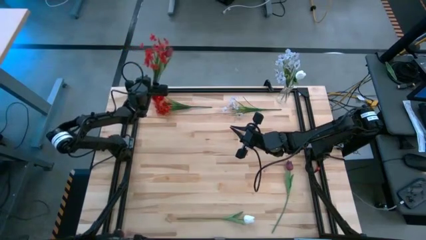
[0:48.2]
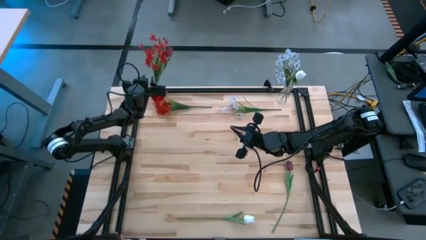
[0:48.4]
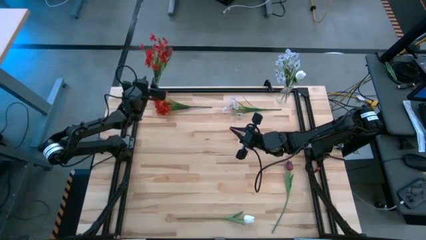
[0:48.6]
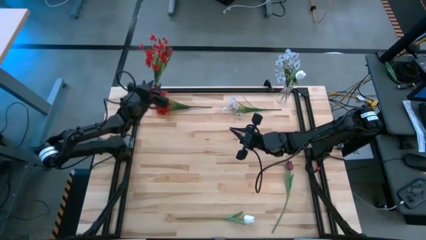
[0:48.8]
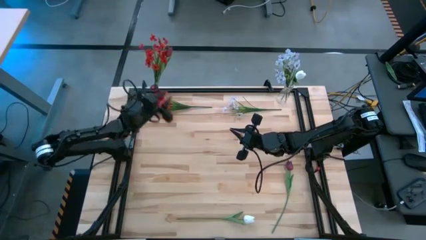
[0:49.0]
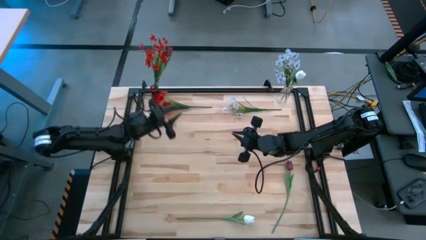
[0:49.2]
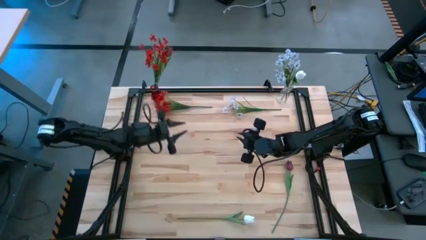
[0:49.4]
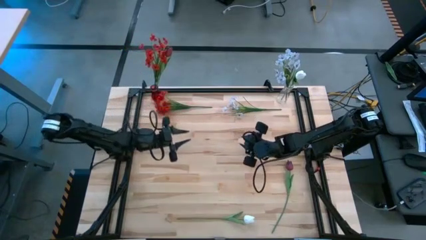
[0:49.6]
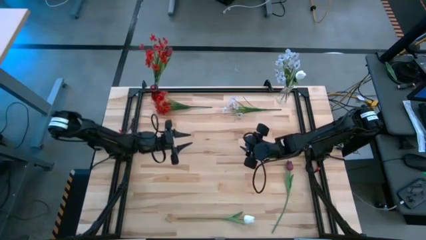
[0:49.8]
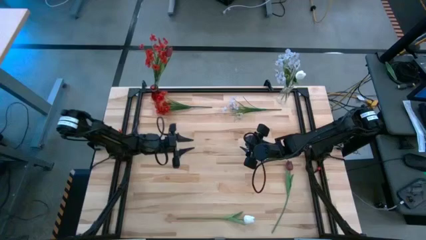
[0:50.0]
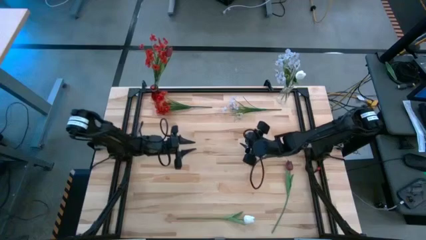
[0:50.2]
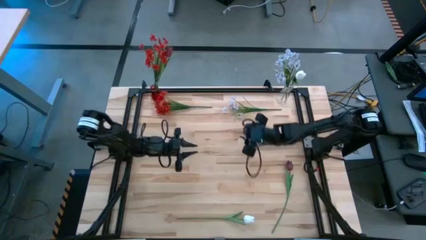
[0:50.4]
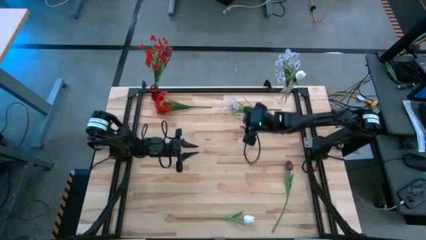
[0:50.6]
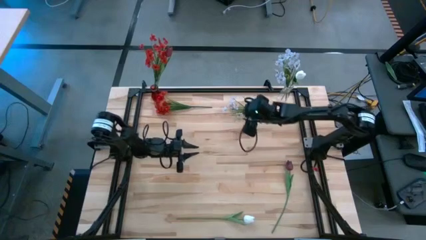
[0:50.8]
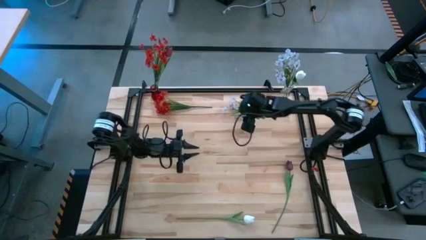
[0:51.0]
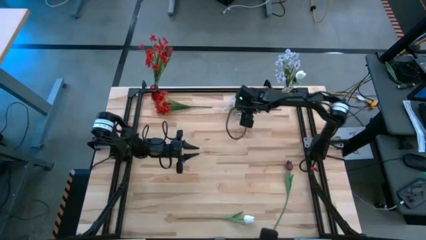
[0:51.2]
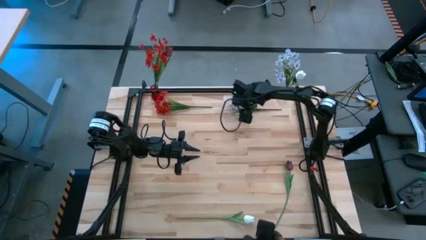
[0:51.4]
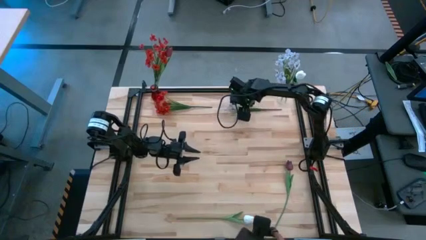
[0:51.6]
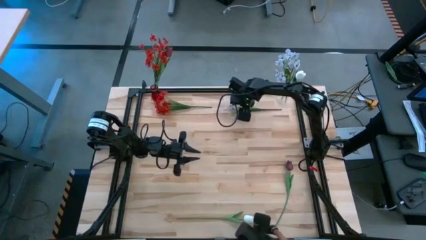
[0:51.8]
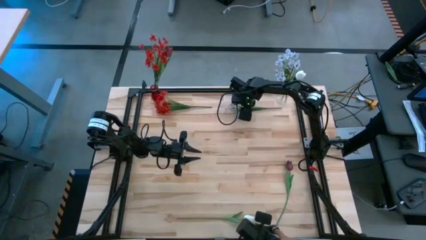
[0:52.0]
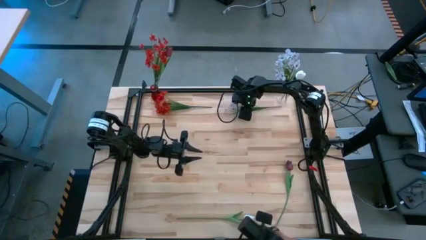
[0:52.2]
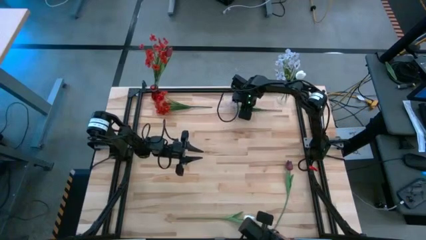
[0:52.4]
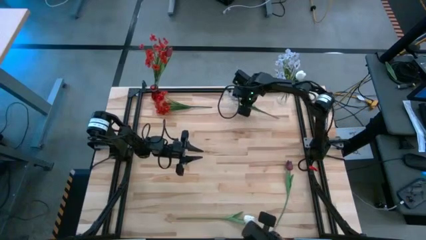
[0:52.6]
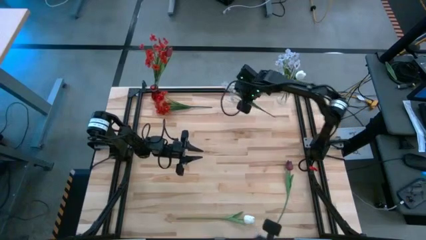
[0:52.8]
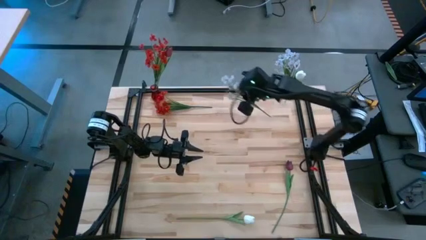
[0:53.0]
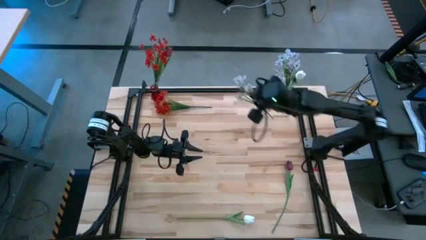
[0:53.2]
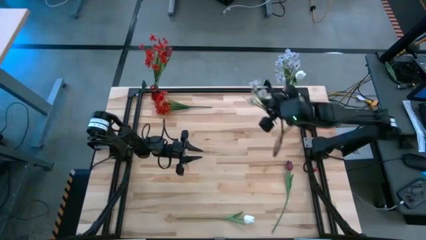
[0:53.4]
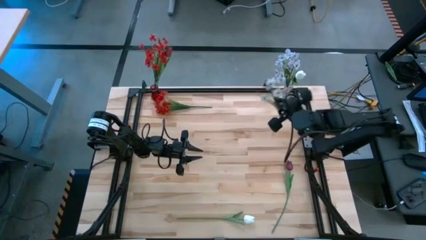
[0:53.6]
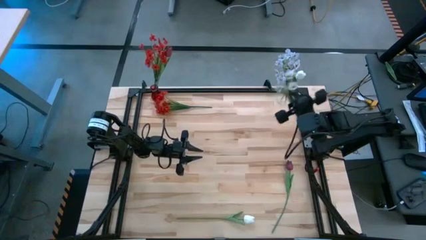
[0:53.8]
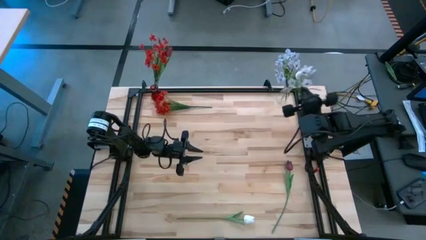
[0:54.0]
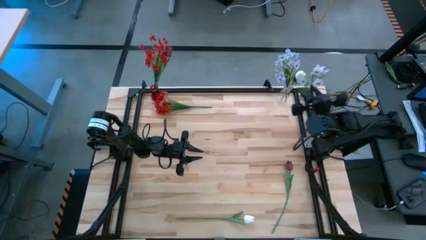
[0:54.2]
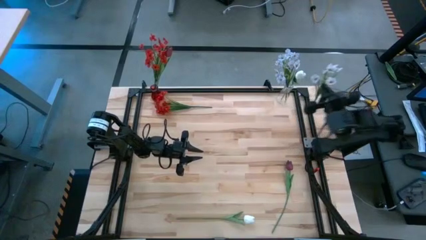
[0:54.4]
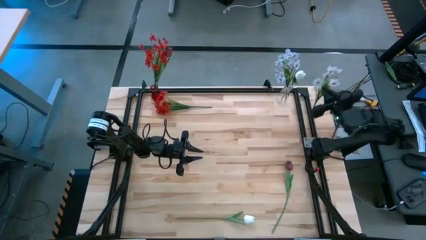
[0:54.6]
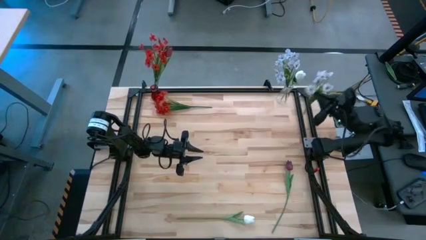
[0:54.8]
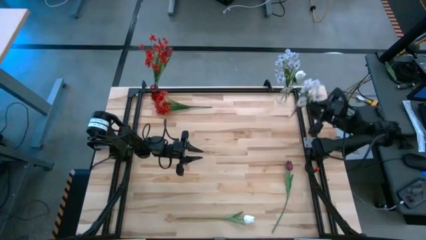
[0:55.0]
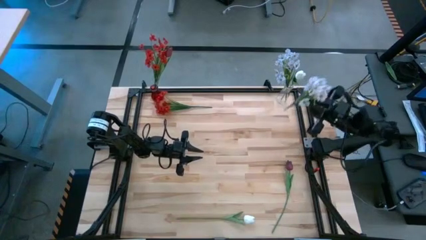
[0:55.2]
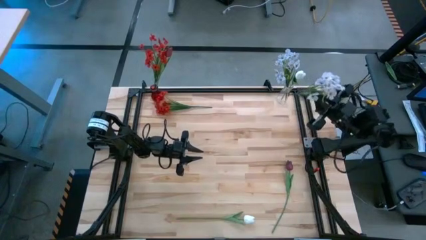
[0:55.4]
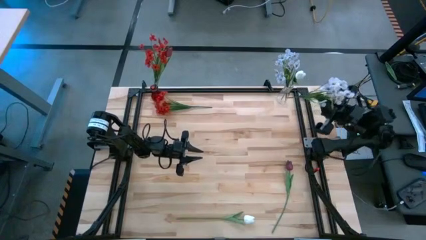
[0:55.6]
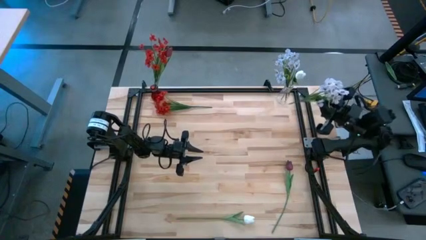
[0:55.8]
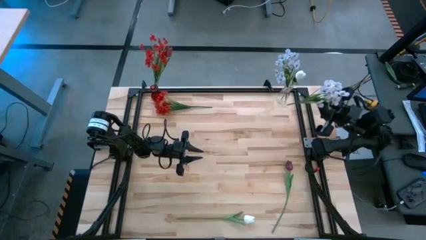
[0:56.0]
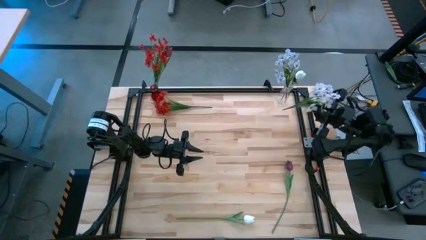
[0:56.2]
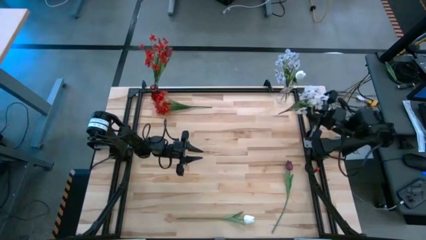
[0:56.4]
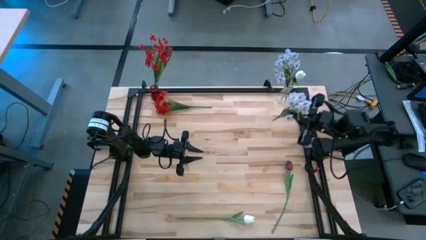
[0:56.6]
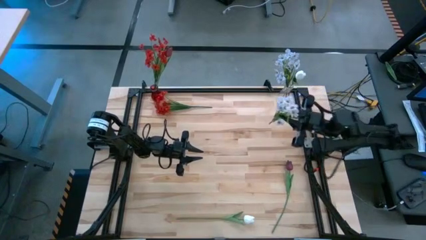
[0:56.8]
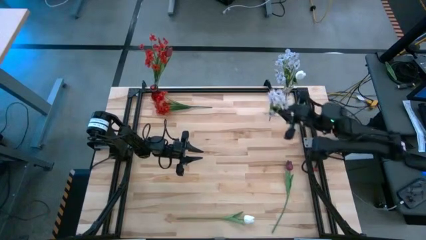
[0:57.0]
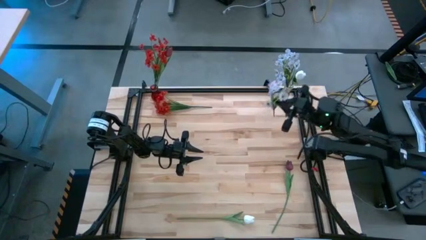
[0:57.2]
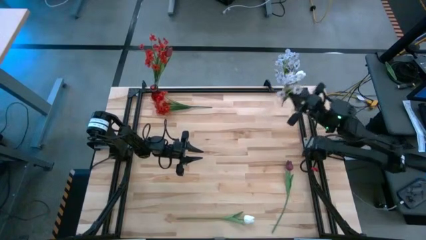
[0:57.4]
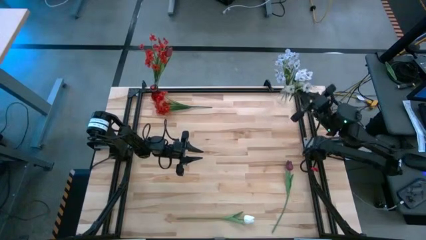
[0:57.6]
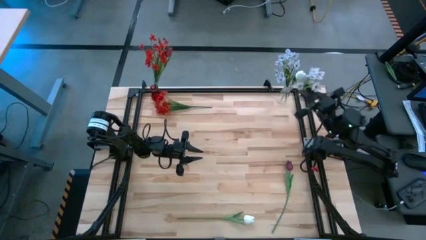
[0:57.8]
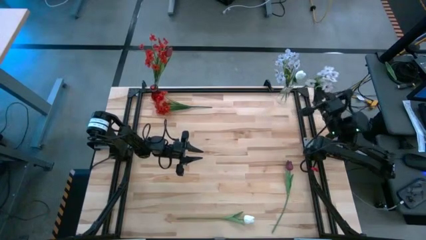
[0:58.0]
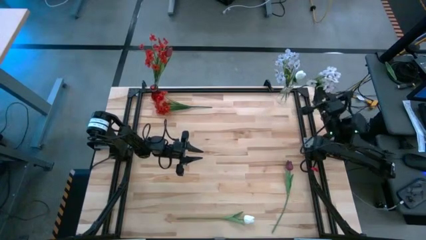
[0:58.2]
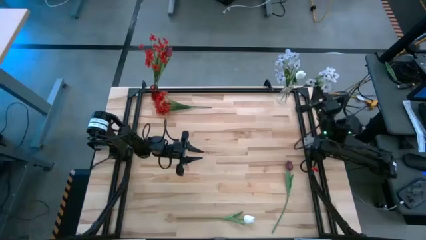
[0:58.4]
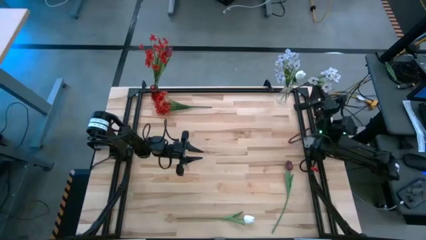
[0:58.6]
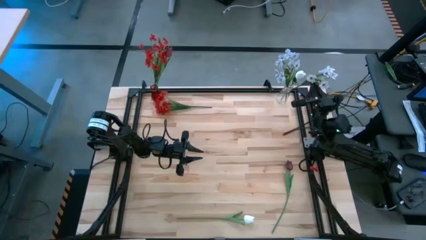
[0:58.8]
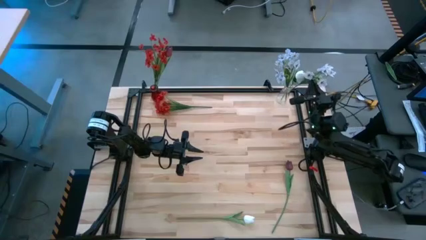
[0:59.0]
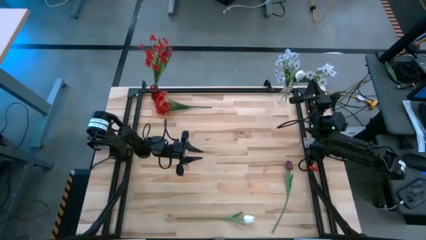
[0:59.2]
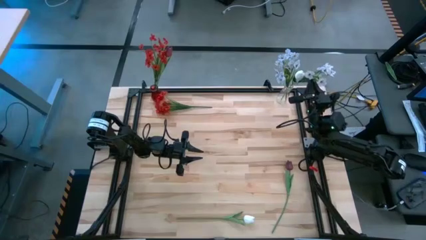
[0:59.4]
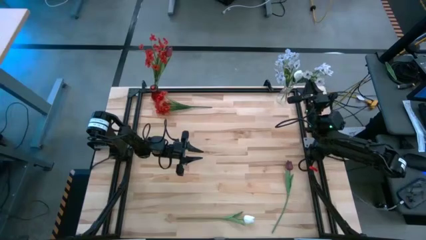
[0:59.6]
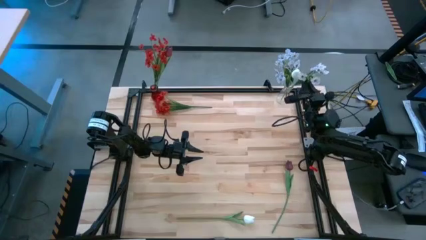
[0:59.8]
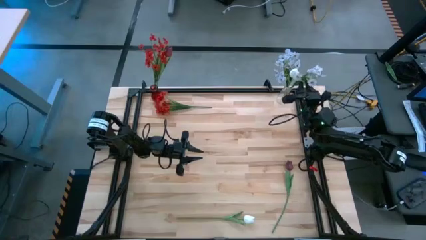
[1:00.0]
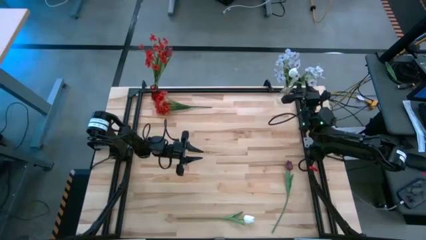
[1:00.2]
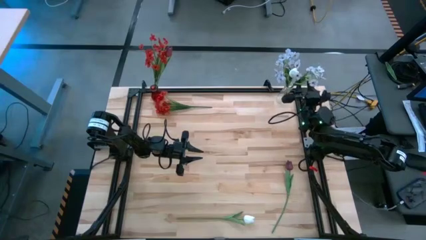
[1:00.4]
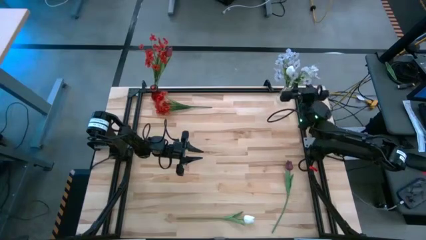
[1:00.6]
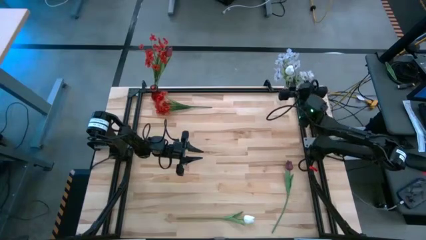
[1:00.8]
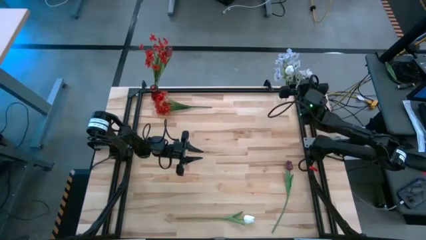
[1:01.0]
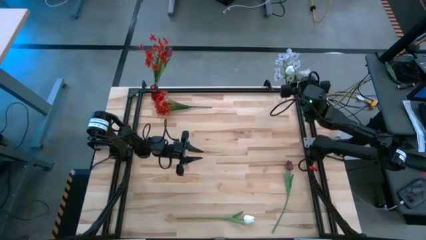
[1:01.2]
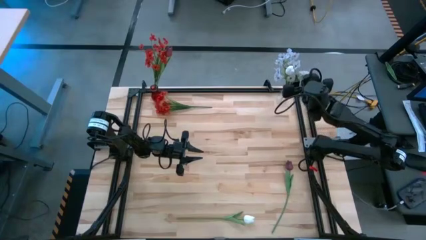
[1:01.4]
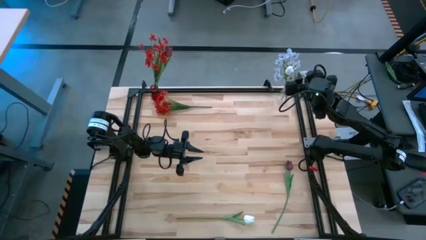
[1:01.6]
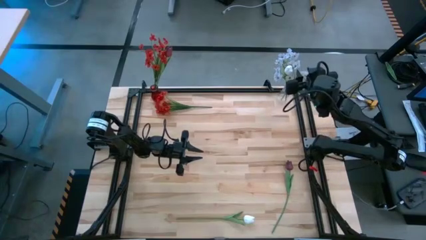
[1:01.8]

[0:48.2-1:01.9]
Task: Sort flowers into vase by color
Put the white flowers into the transparent flower vase

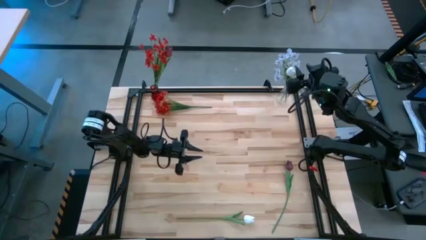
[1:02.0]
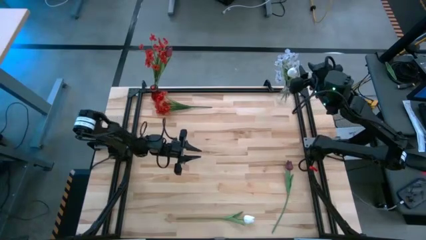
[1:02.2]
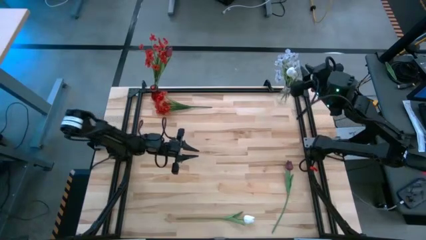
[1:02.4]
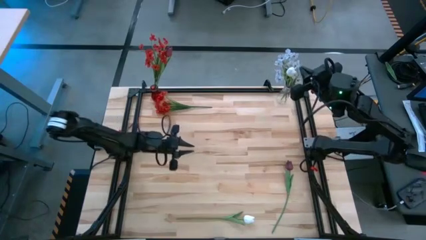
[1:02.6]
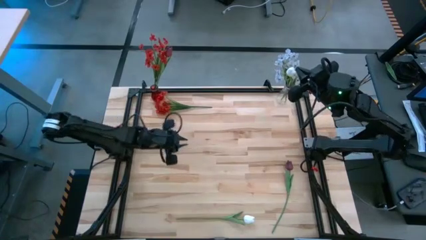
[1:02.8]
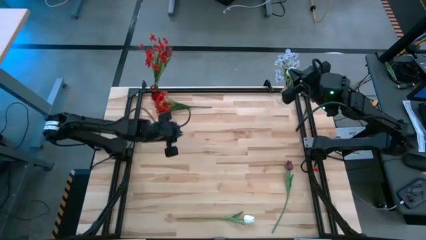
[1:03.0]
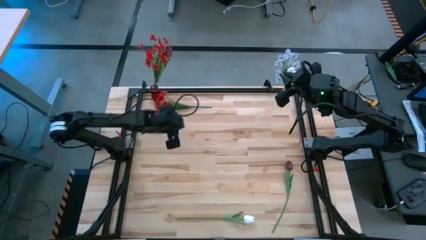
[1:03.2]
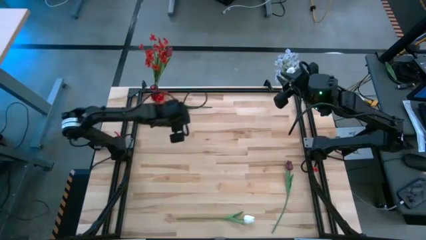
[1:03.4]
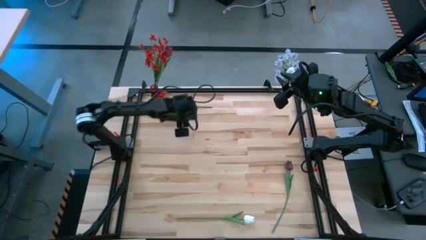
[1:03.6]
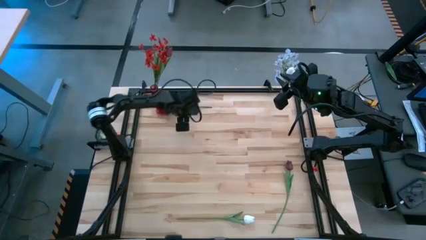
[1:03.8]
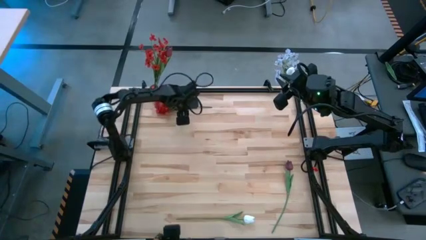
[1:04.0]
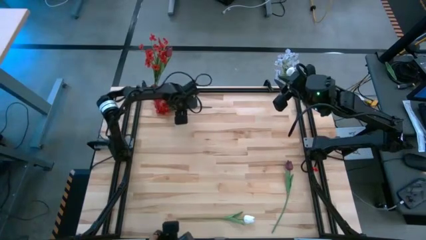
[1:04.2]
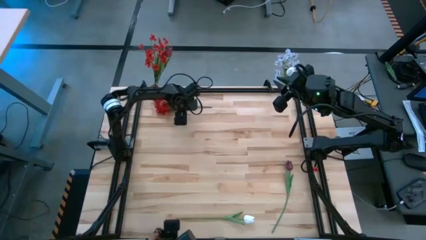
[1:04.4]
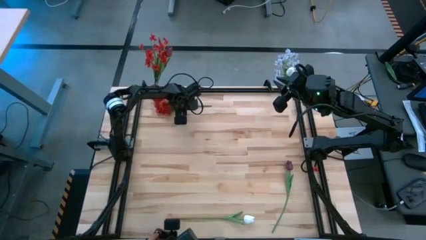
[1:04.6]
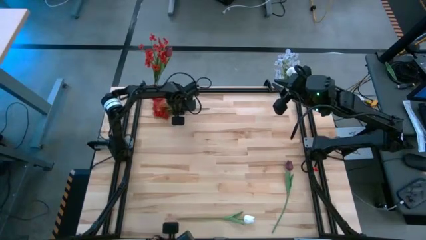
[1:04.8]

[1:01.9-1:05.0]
Put the red flowers into the red flower vase
